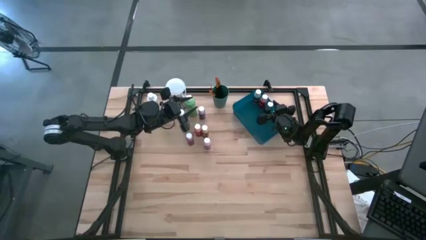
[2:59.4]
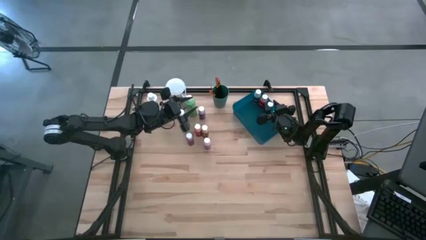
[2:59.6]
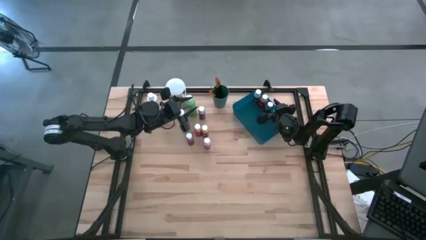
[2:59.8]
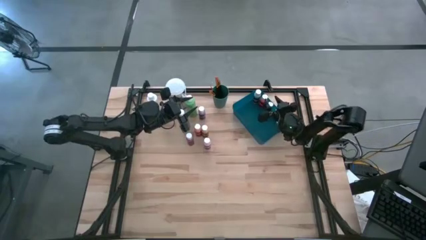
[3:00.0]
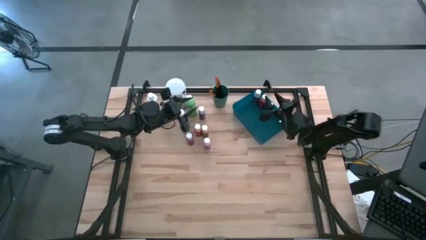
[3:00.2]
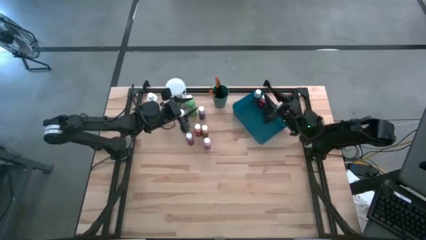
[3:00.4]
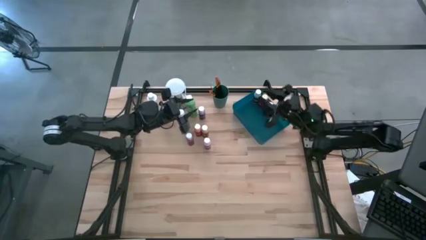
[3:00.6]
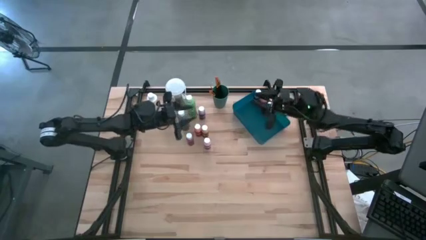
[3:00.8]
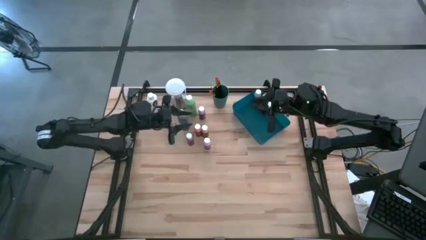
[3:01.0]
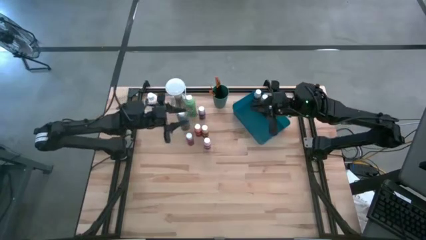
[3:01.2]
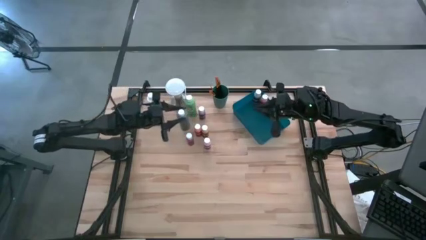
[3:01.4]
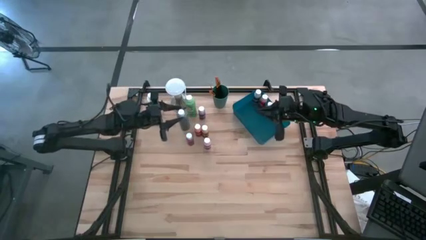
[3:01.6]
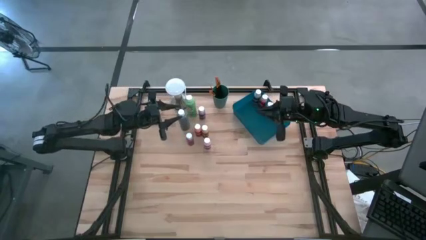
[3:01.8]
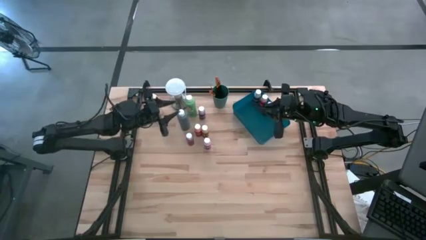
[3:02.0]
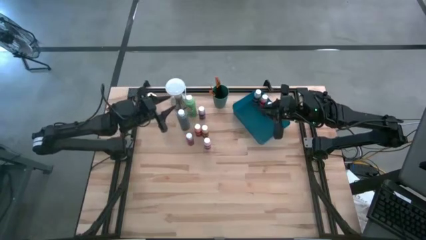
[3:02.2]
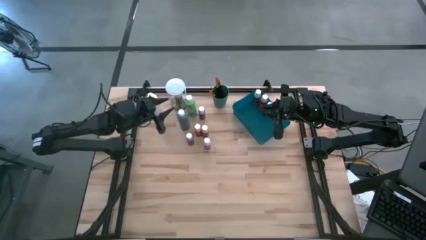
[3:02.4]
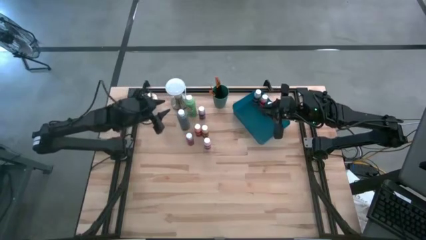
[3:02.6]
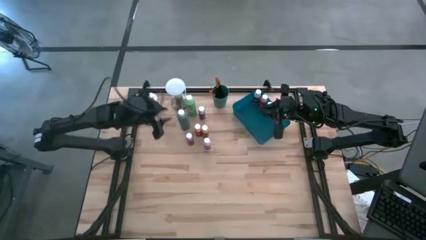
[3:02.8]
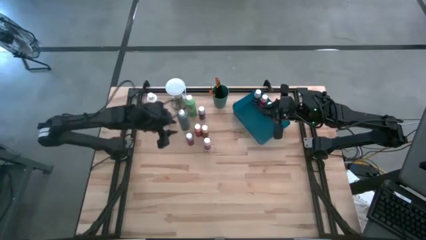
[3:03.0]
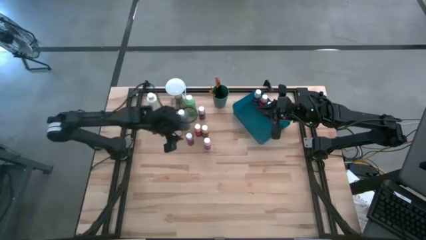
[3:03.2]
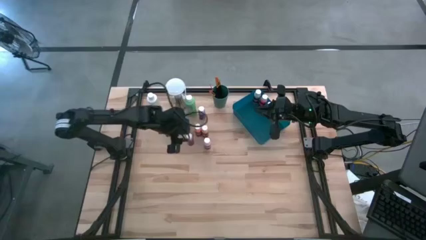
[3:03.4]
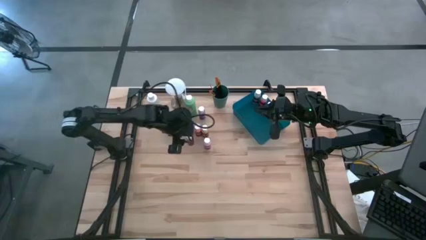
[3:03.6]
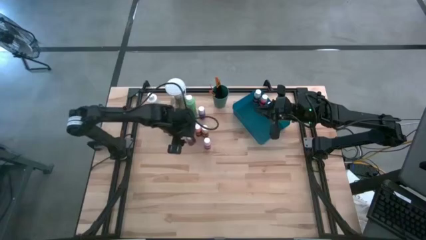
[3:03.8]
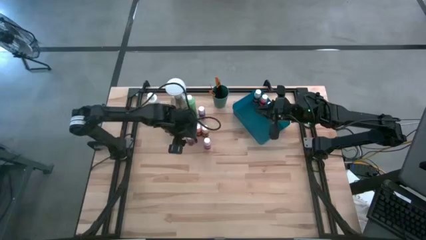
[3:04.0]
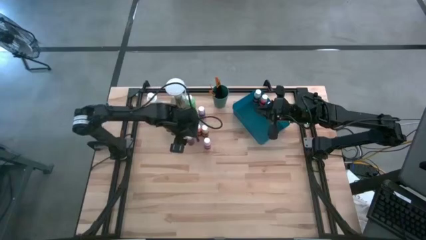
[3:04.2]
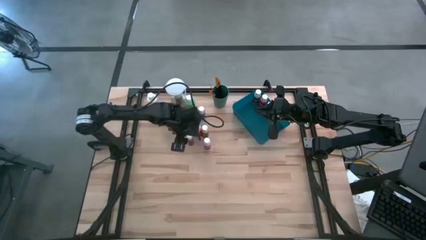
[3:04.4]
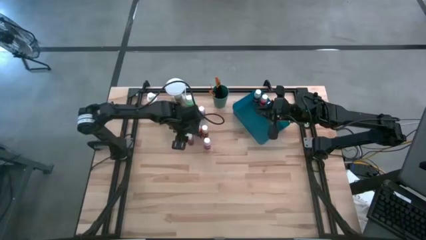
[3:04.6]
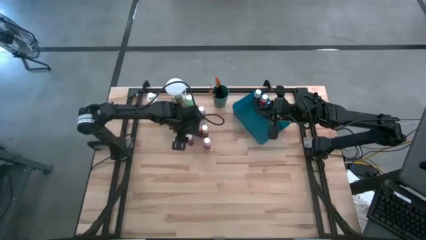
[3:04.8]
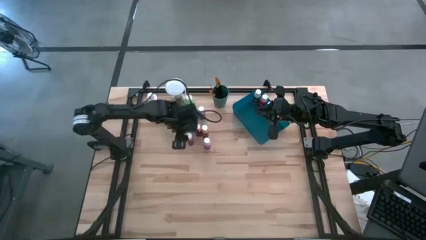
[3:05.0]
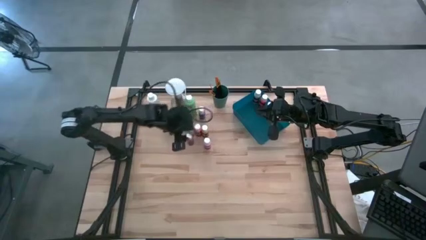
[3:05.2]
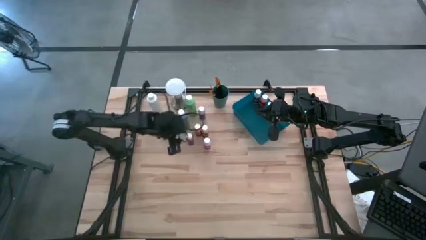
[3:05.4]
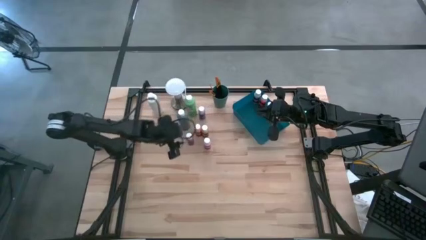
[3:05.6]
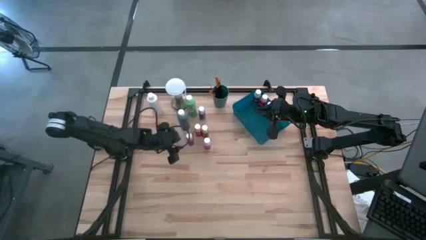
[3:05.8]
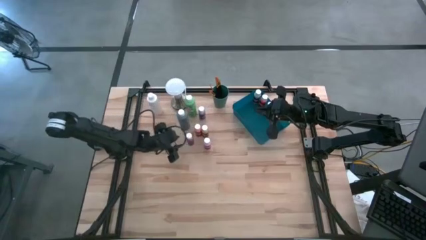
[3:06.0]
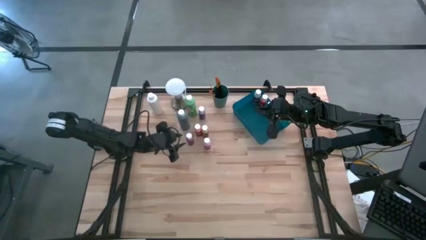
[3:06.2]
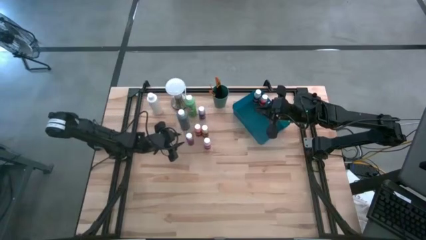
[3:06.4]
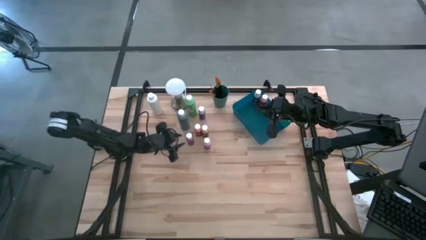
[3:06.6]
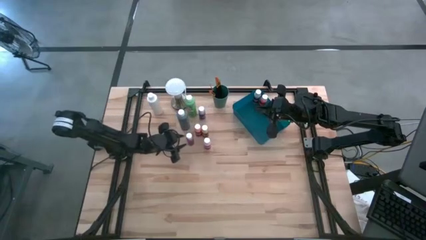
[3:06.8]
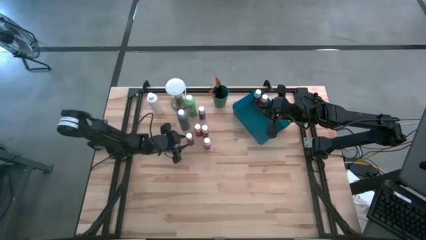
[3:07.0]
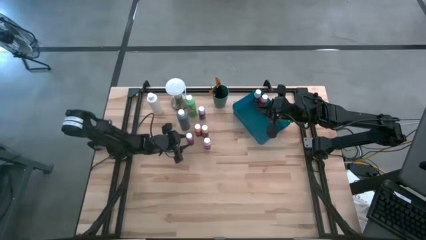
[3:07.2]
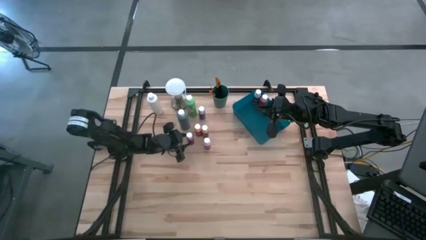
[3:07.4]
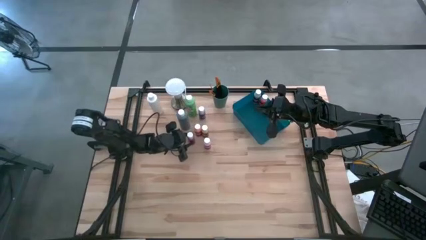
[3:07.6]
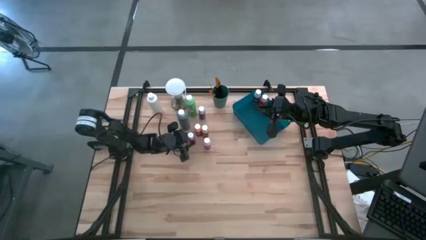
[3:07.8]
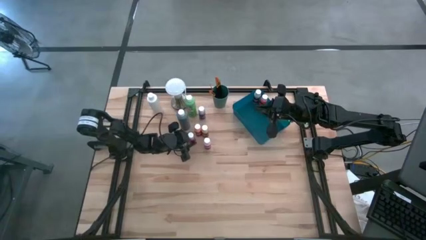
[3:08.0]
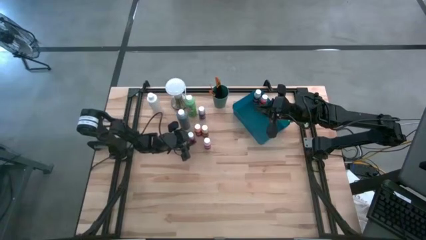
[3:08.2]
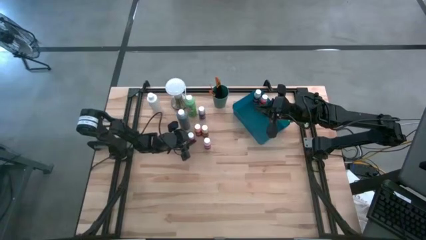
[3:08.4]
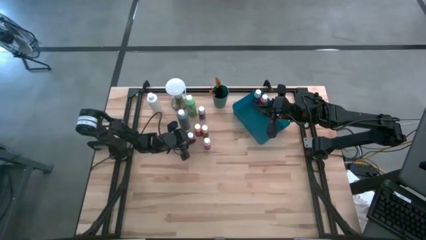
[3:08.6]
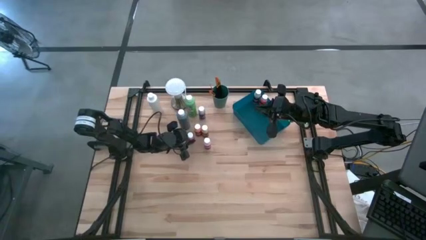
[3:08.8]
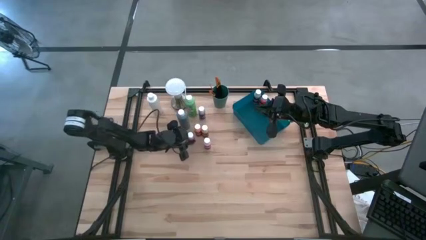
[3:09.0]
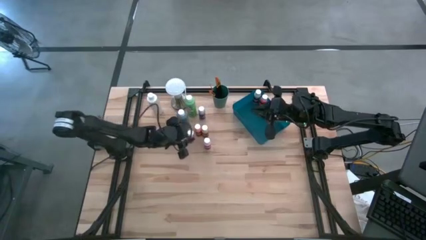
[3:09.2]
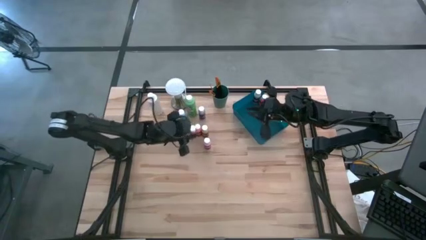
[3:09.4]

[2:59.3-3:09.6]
Task: Pick & Place Paint Supplies
Put the red paint bottle into the blue bin
